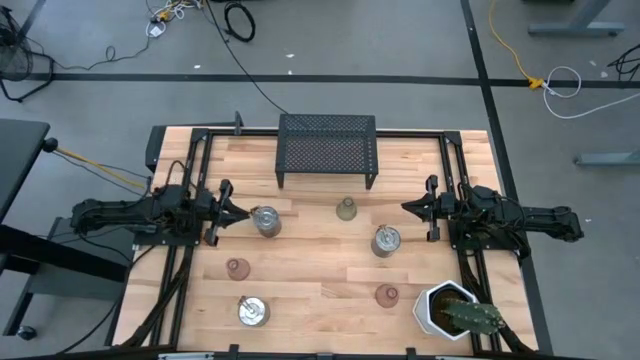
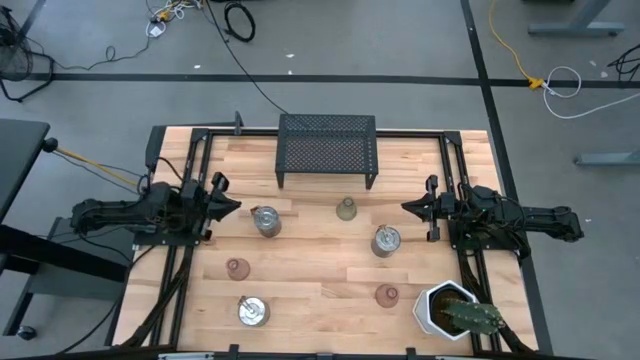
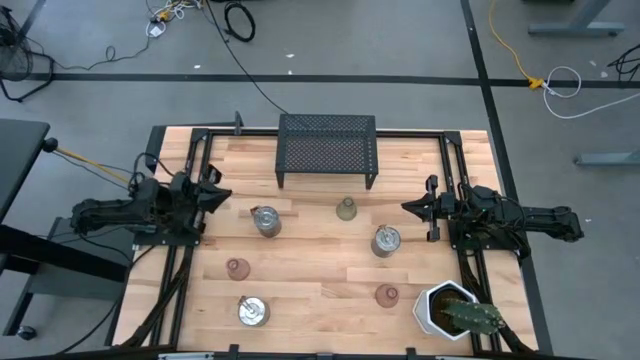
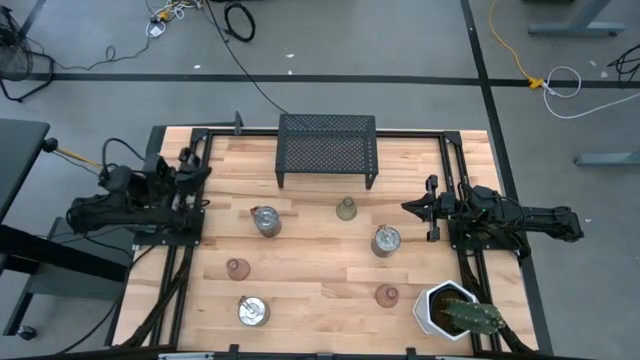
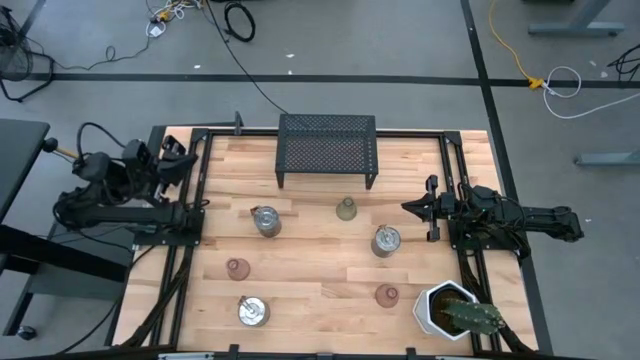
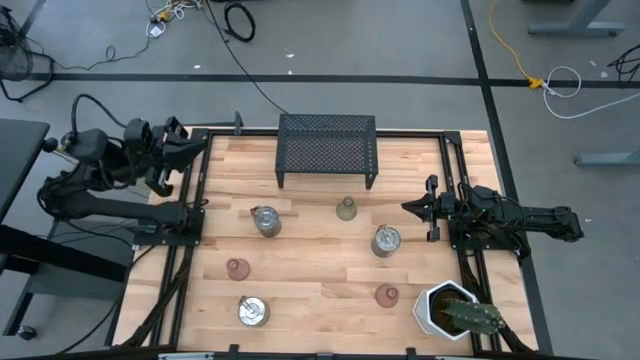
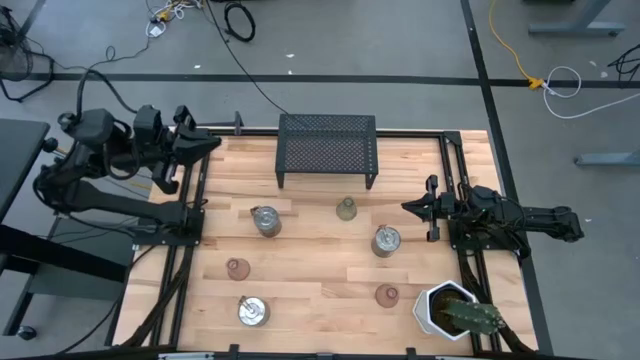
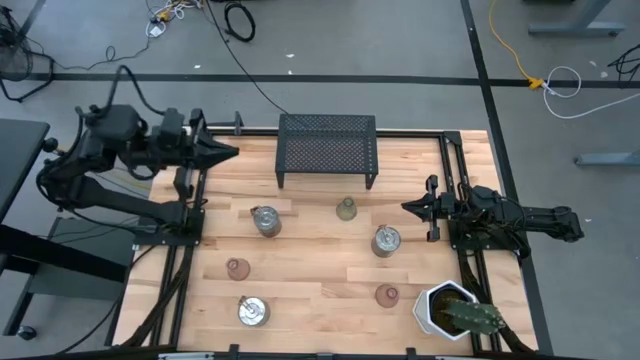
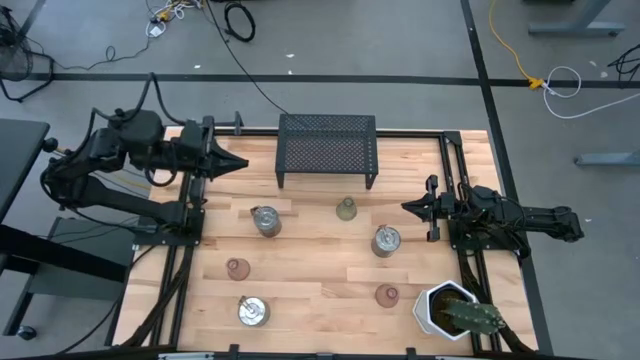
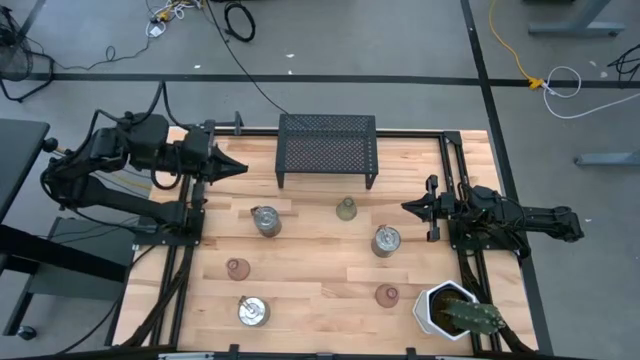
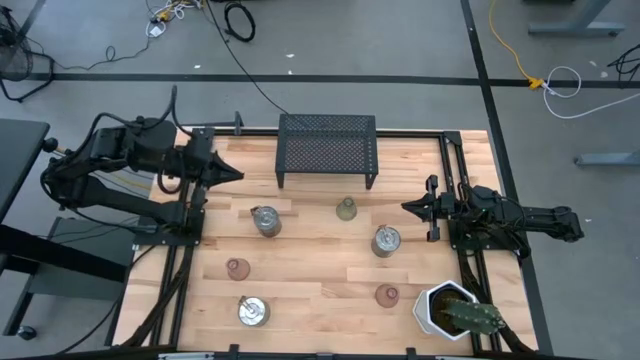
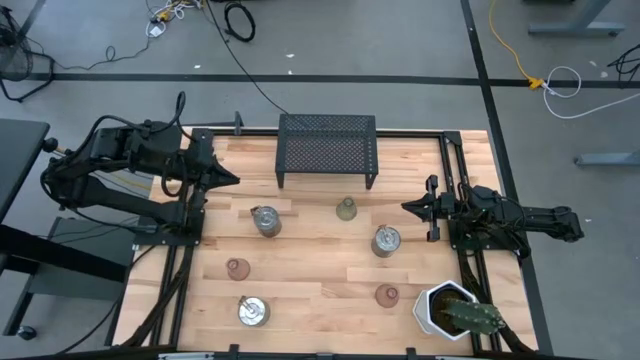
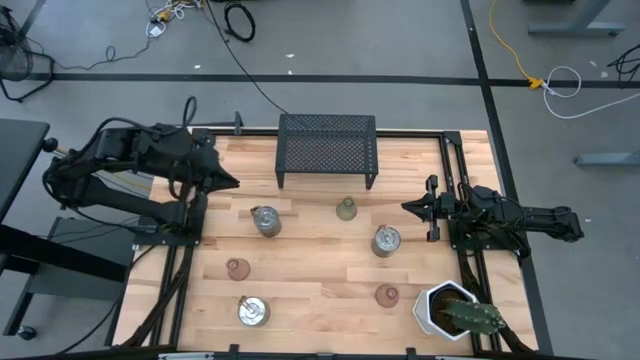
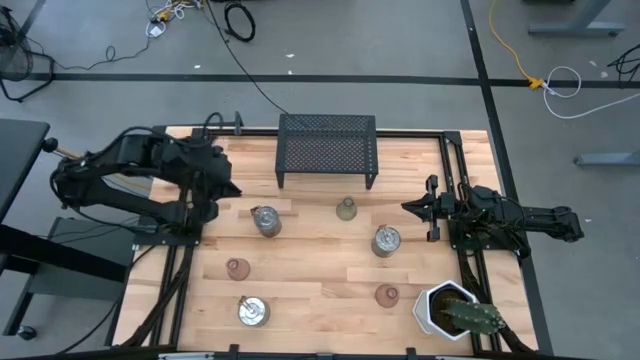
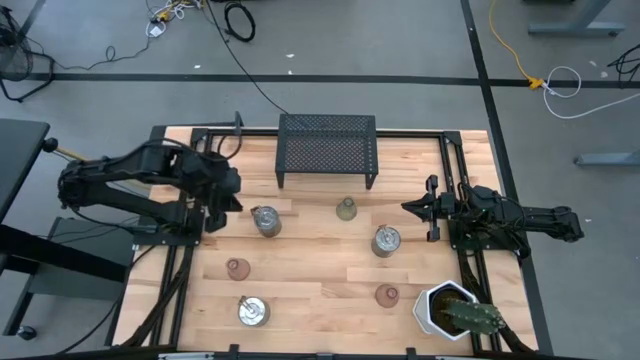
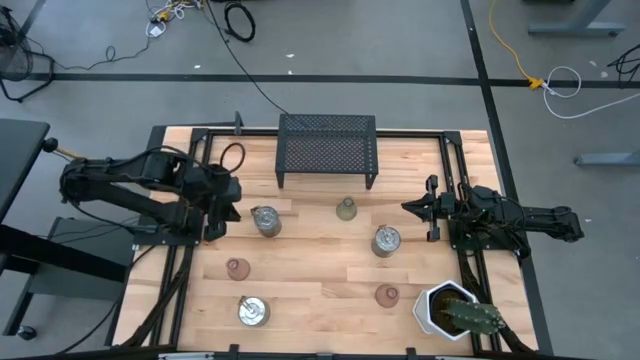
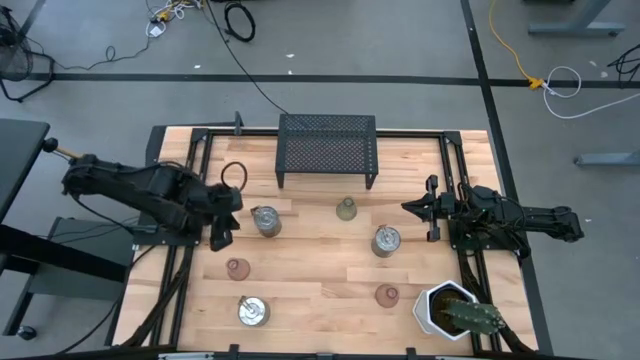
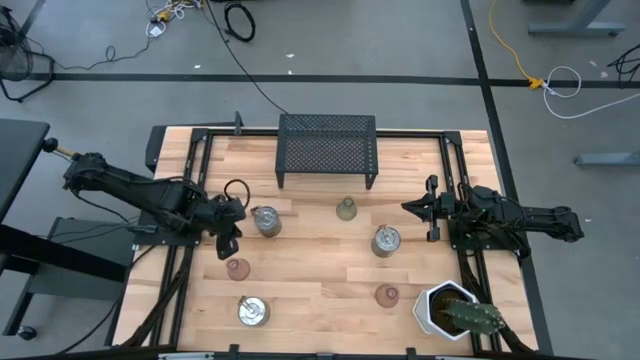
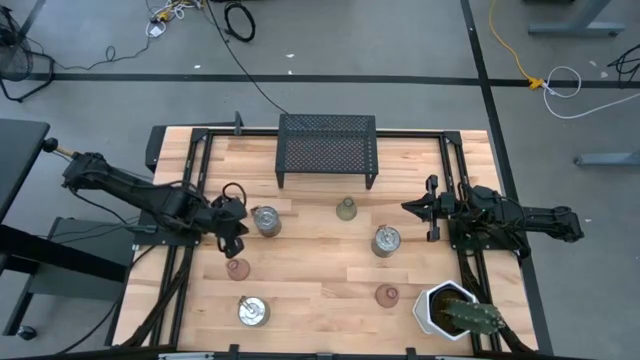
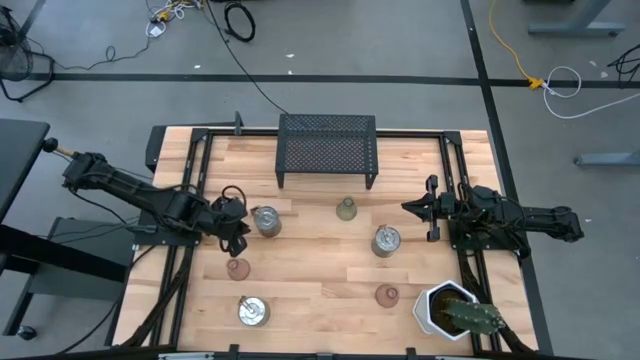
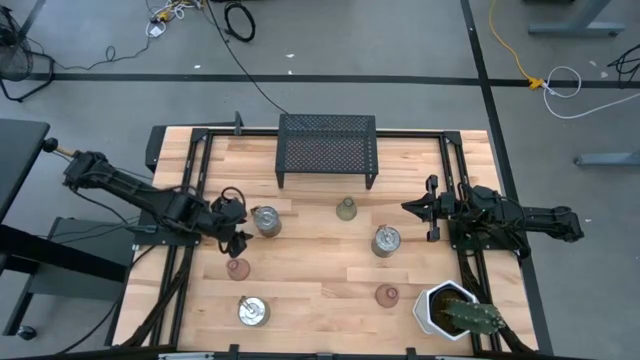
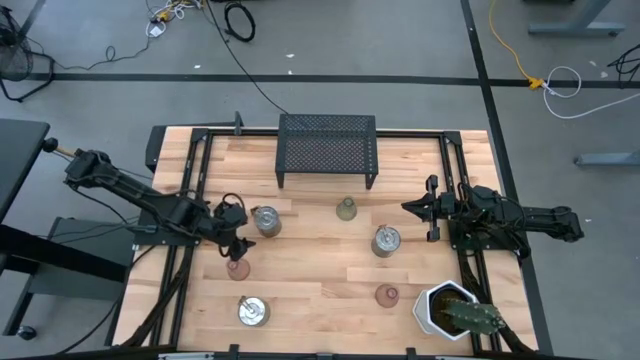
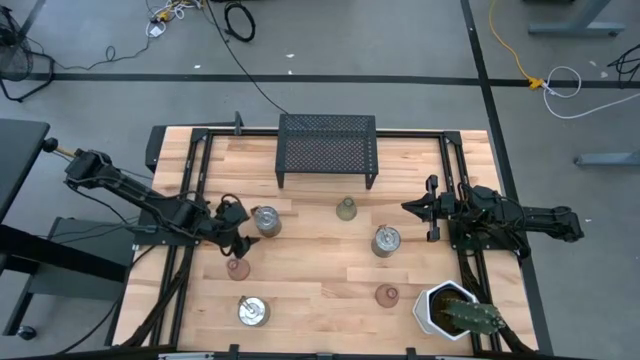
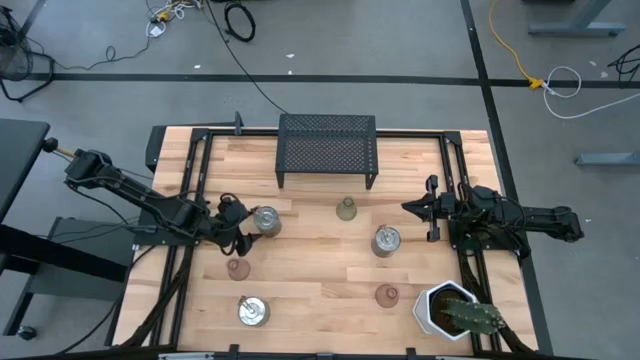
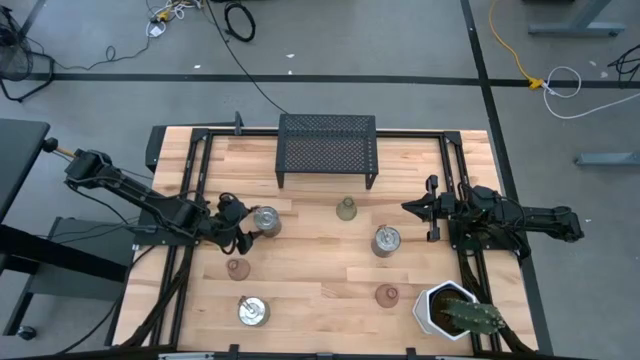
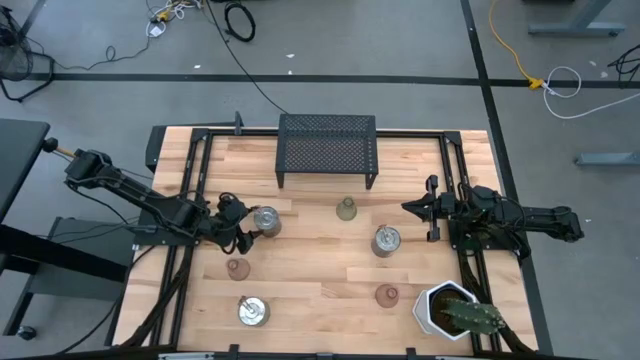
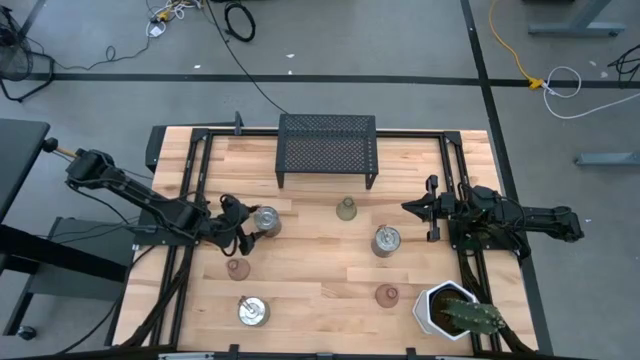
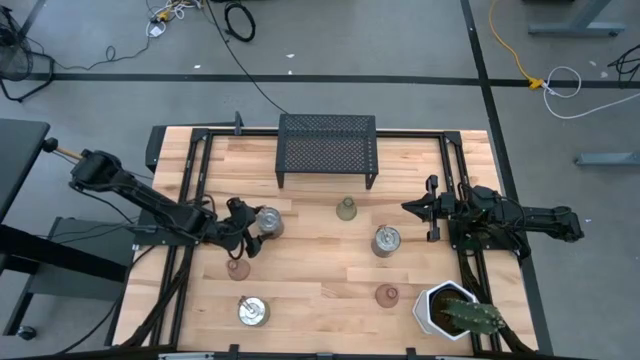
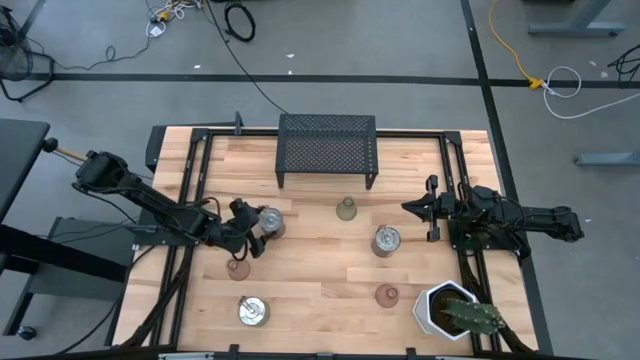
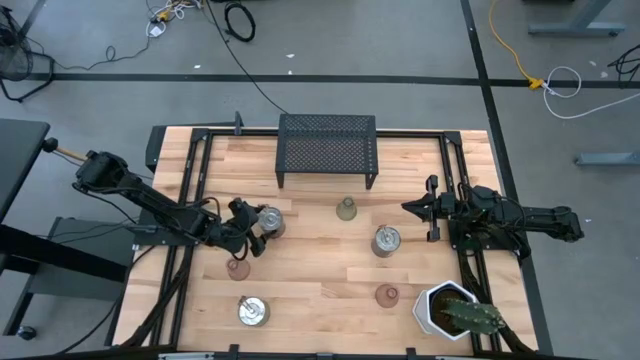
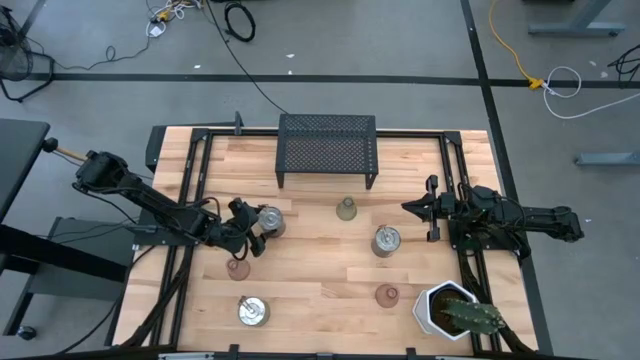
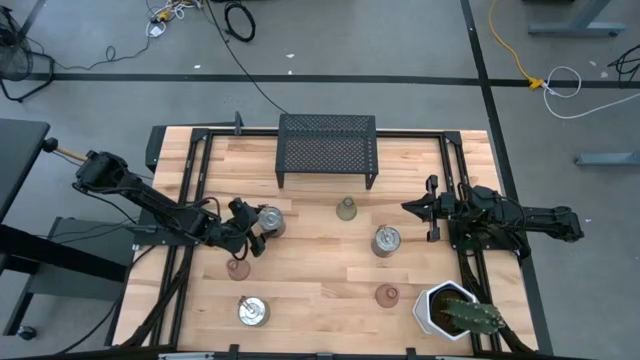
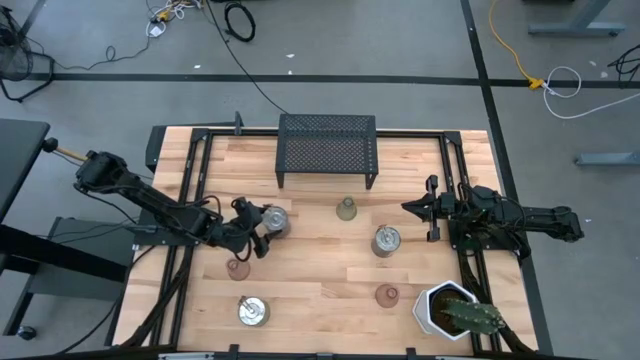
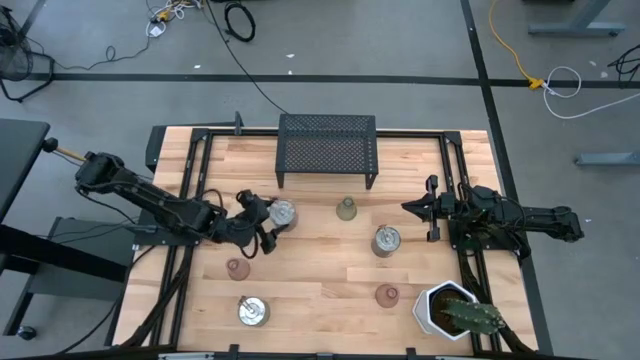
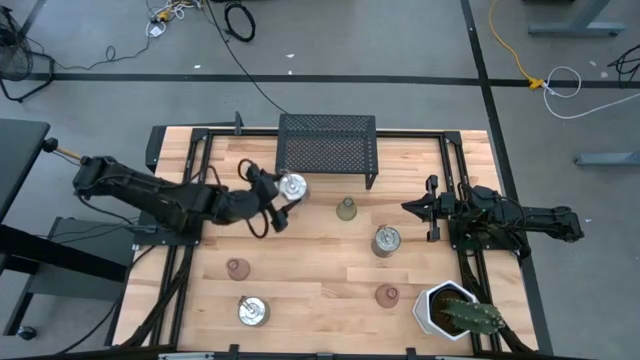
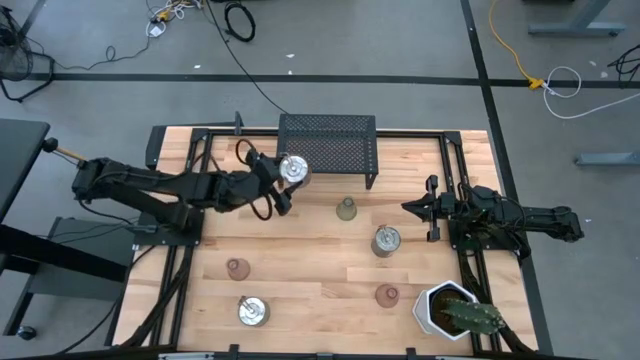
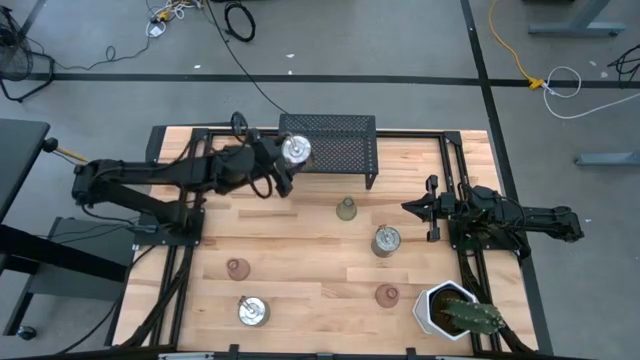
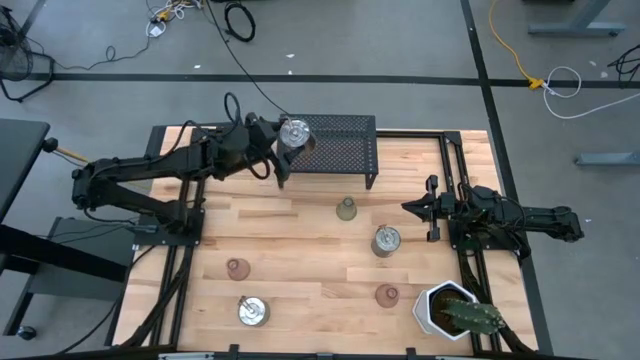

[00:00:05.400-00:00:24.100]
Task: Pick & Place candle stick holders
Put the top left silver scented candle on the shelf
